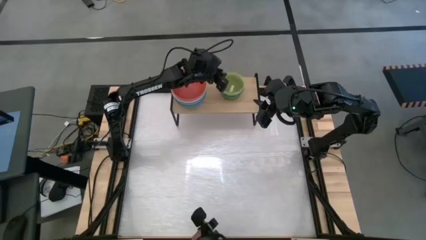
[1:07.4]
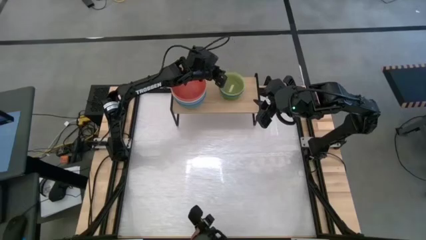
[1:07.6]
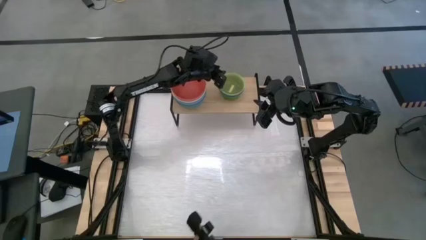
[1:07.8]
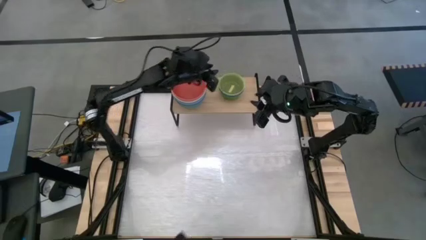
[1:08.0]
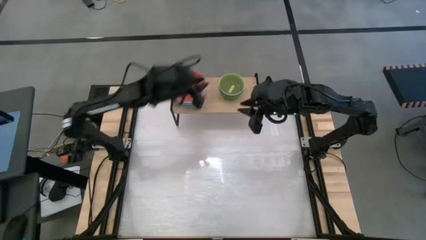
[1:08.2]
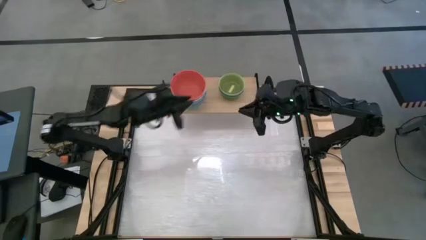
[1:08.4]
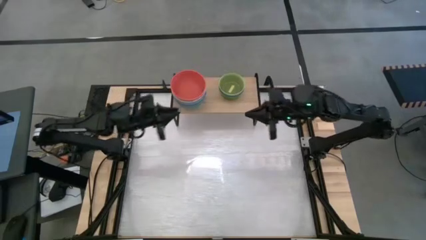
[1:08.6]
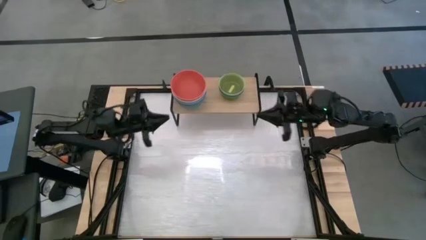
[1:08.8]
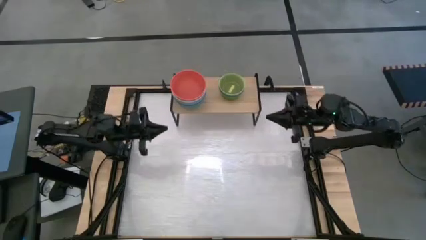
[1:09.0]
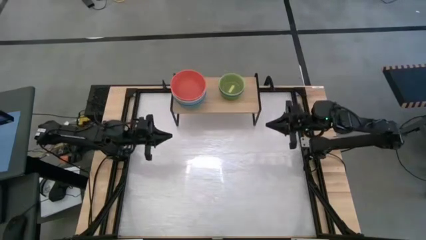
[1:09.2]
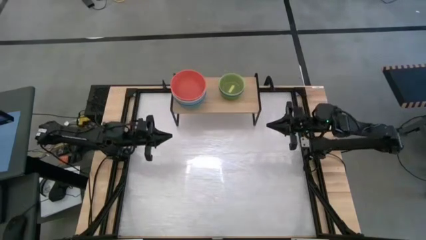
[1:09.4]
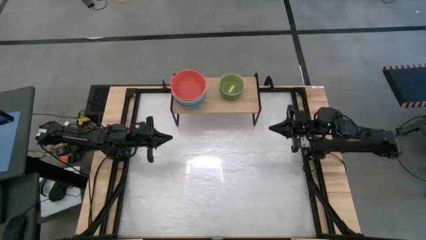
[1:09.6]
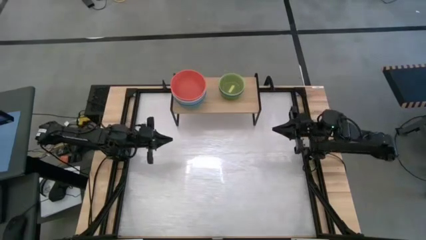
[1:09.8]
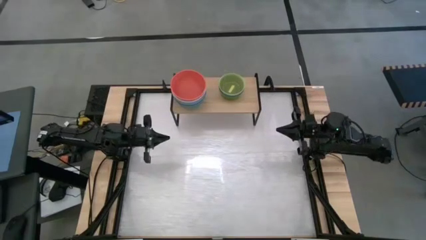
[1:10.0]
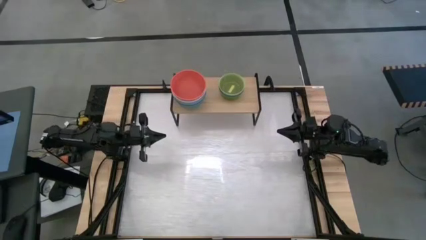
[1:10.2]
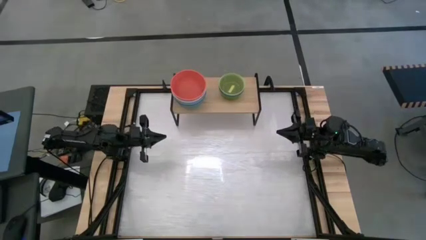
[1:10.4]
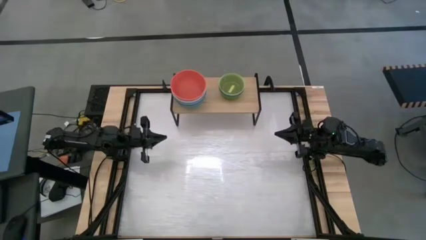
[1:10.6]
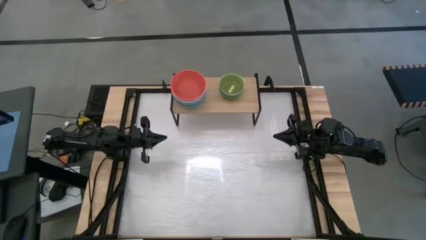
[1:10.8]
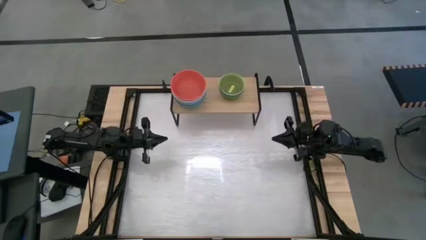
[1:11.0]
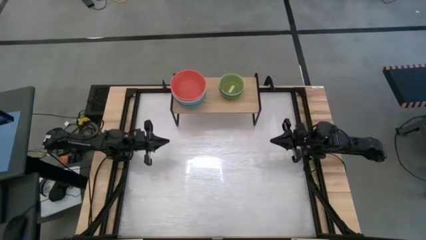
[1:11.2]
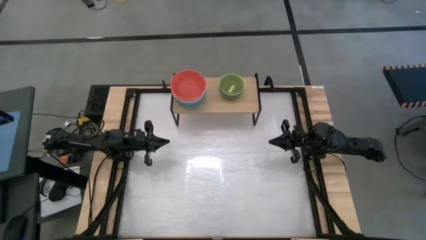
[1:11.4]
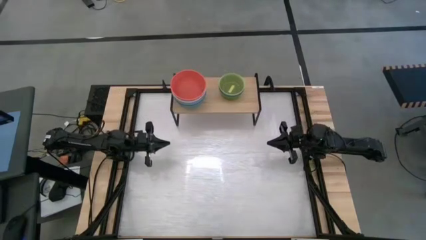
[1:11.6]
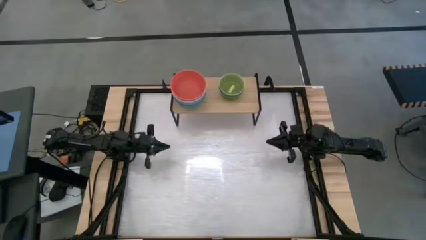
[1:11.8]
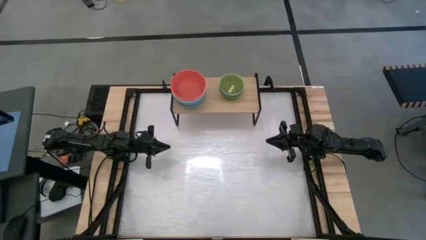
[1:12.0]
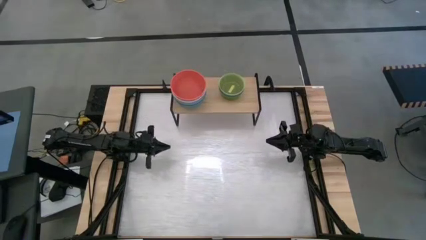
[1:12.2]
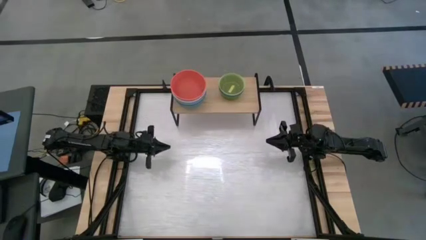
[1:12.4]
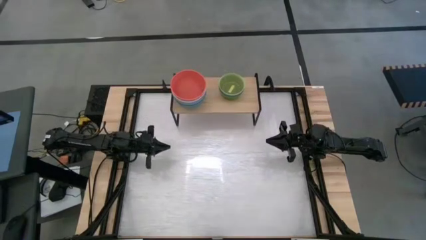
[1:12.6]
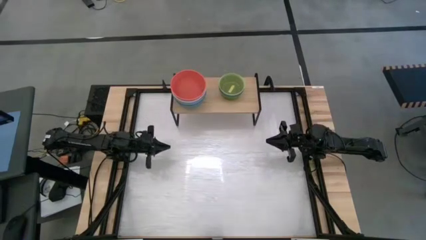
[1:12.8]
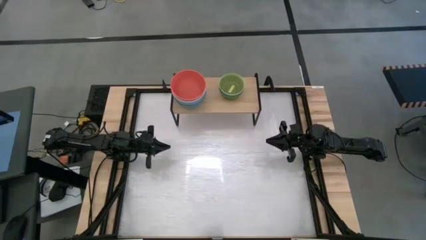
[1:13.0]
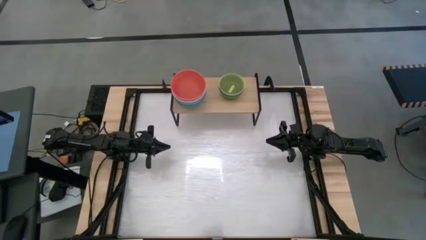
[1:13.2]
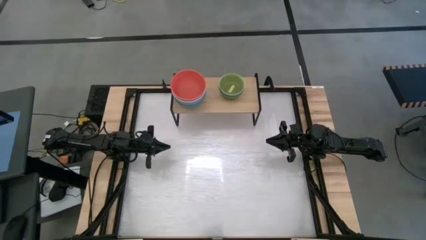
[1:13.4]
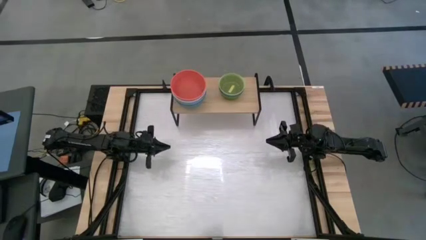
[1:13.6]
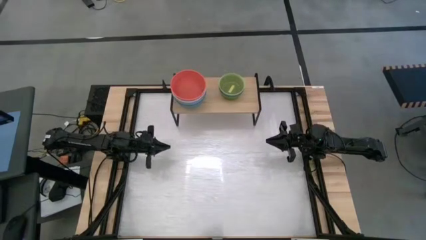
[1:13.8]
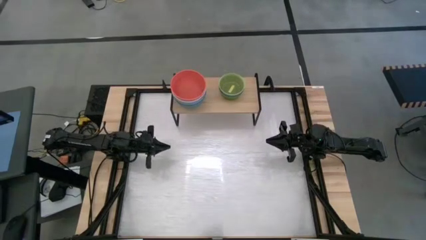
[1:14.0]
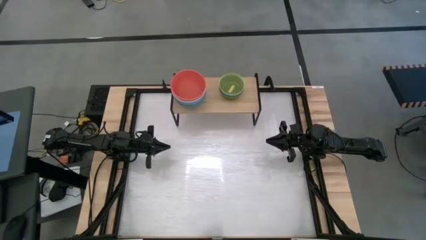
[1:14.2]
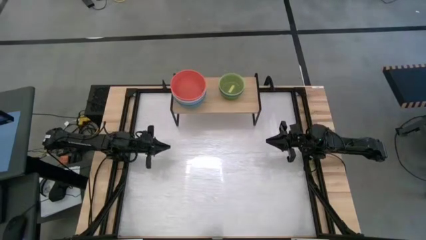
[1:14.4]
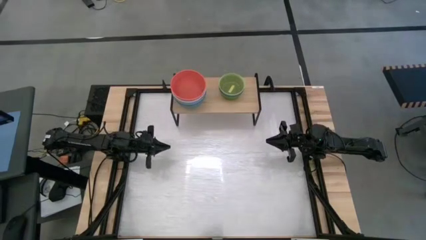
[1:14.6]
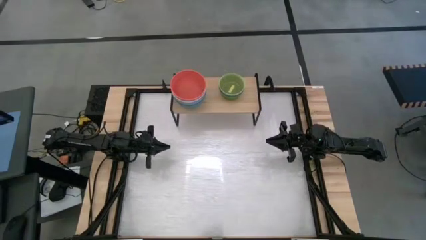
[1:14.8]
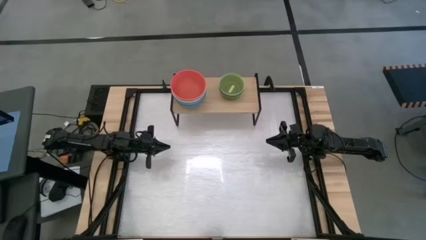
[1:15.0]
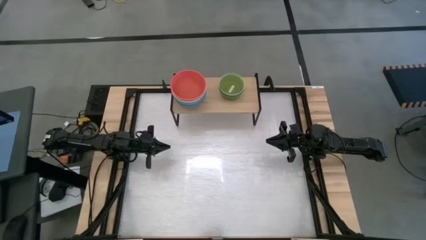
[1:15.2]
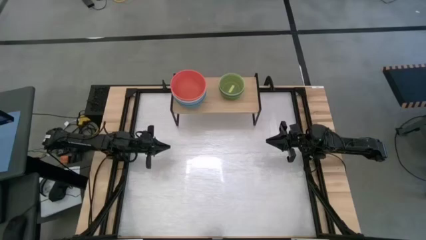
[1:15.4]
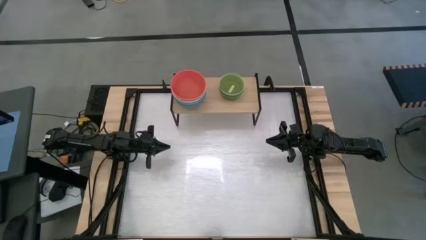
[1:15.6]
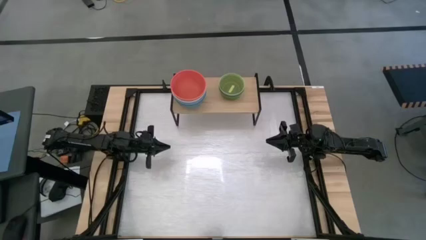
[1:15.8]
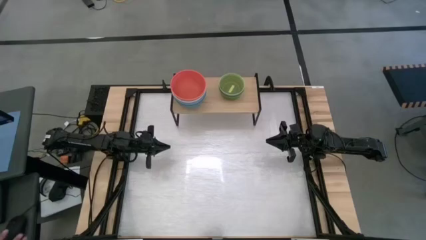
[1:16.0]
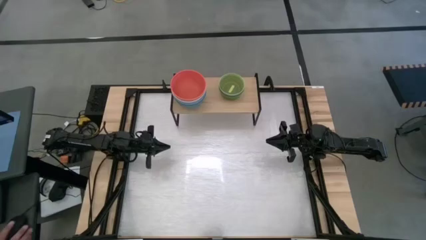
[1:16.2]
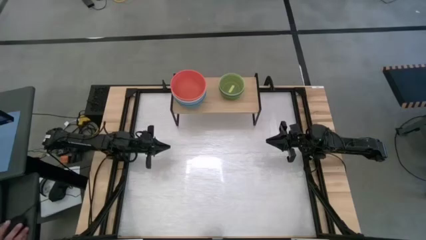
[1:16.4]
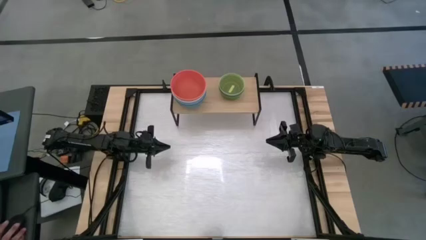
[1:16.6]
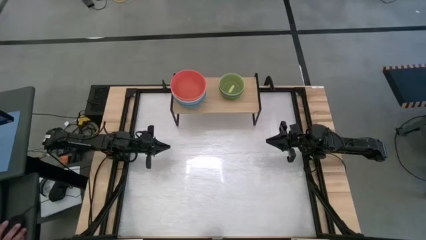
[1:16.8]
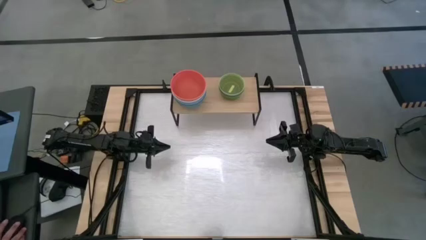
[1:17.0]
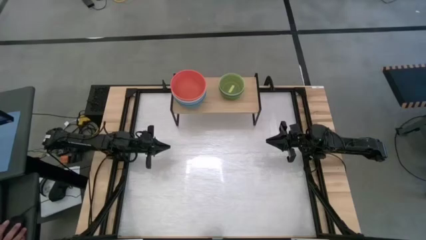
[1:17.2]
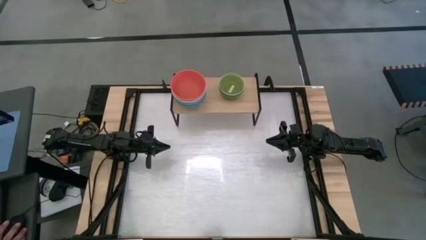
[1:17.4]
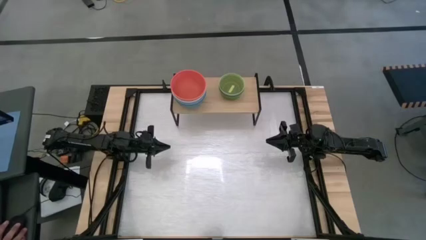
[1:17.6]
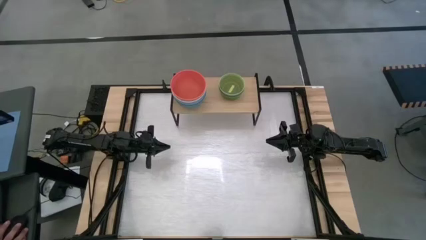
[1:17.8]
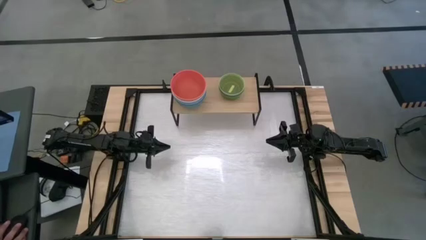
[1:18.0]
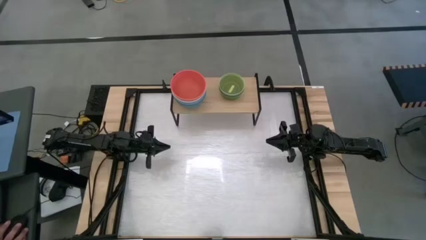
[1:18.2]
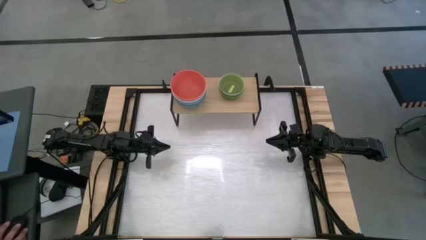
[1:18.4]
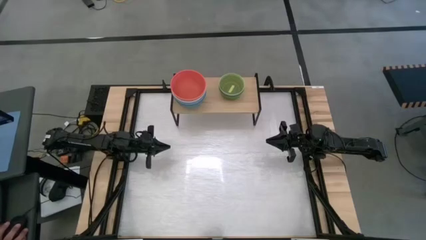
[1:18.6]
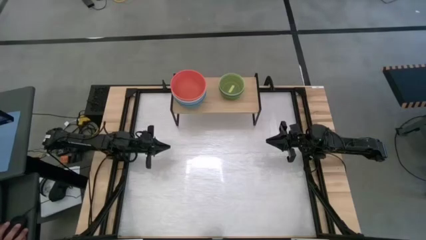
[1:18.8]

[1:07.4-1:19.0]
Task: Place and stack bowls onto a shelf
Return to Home Position

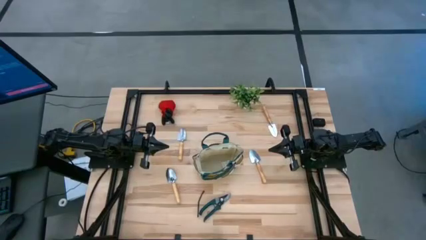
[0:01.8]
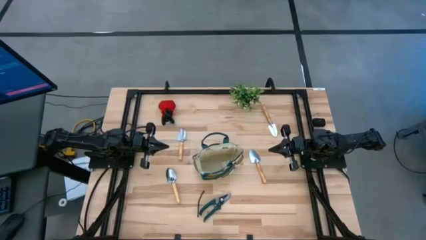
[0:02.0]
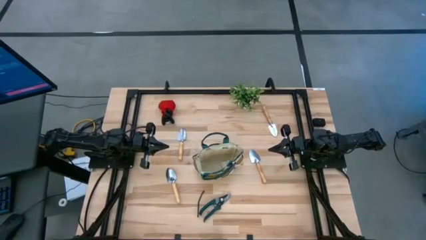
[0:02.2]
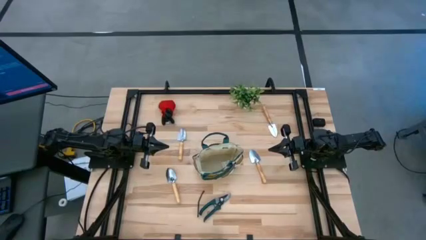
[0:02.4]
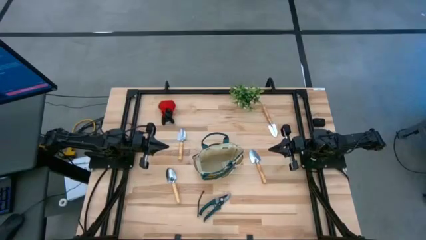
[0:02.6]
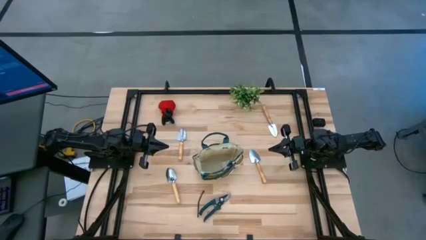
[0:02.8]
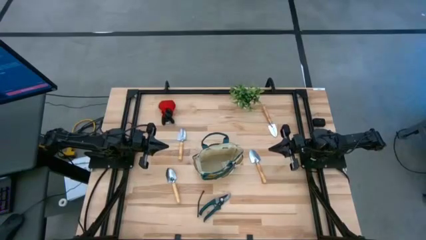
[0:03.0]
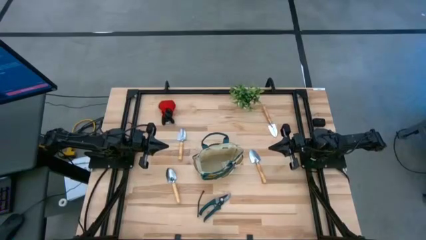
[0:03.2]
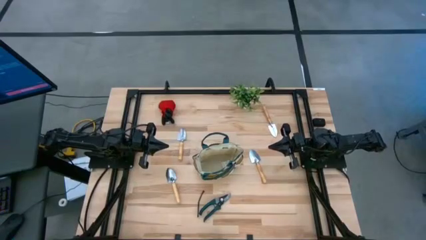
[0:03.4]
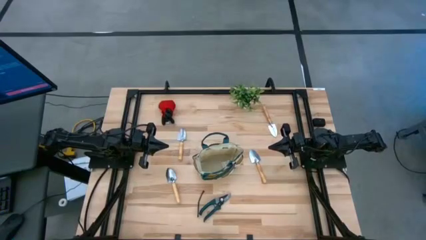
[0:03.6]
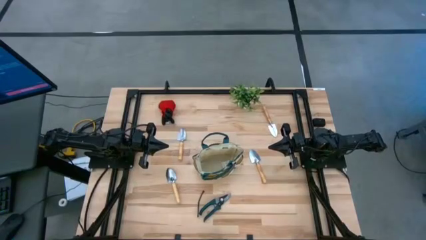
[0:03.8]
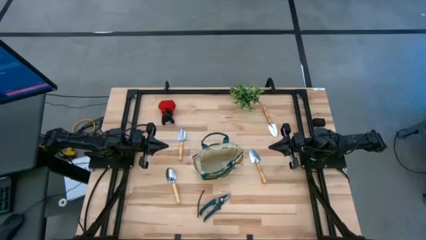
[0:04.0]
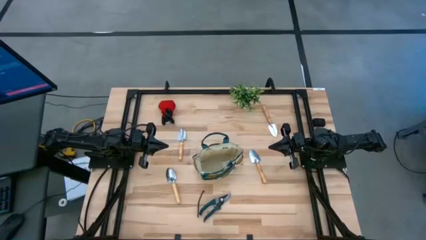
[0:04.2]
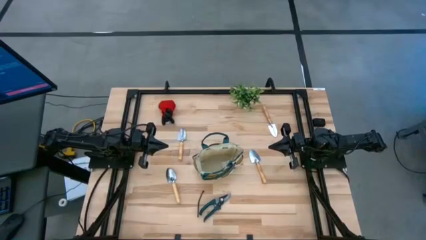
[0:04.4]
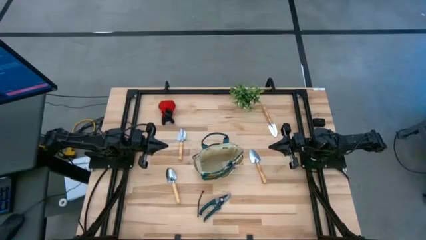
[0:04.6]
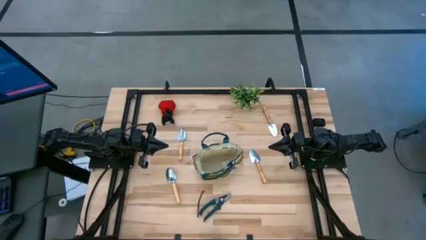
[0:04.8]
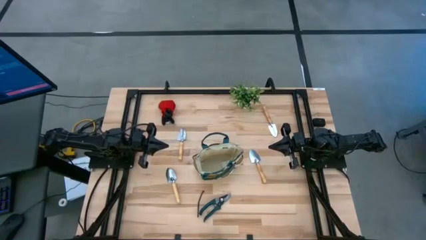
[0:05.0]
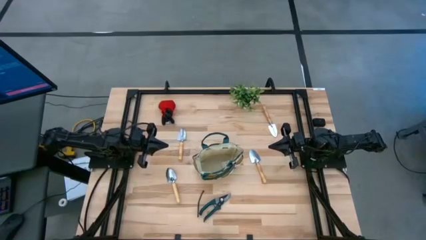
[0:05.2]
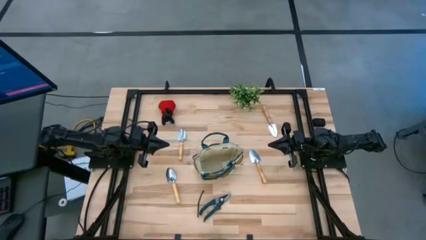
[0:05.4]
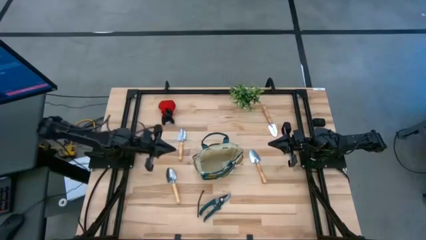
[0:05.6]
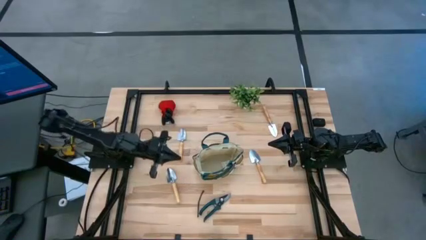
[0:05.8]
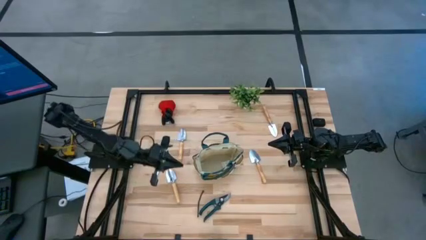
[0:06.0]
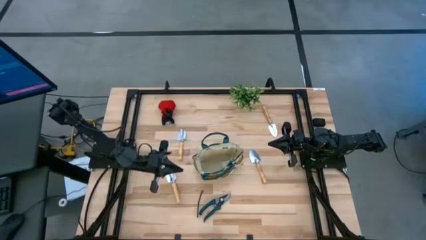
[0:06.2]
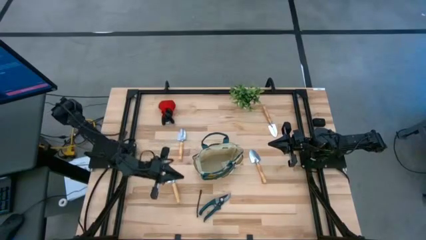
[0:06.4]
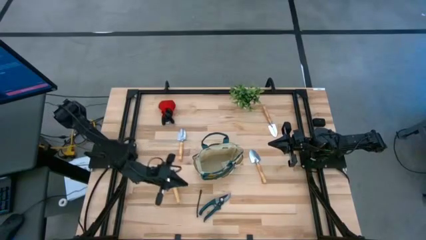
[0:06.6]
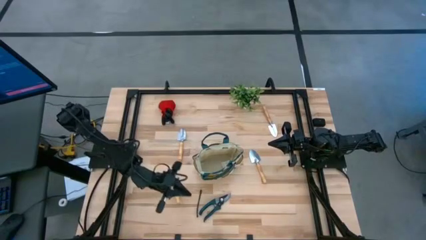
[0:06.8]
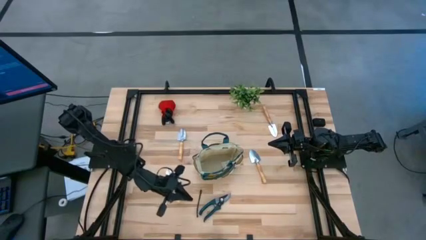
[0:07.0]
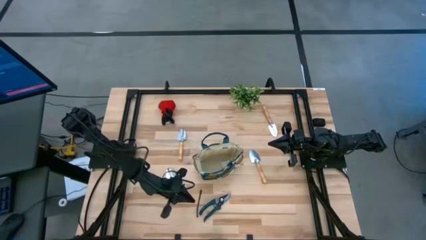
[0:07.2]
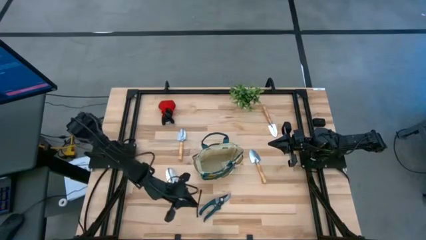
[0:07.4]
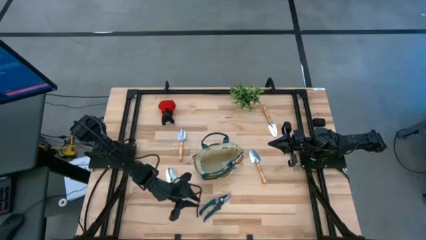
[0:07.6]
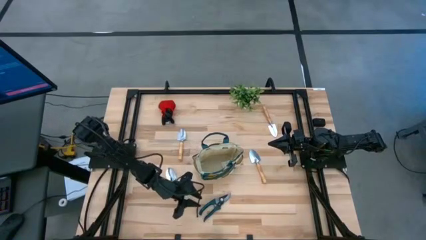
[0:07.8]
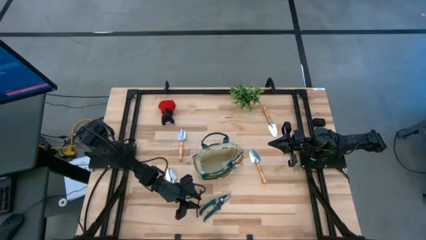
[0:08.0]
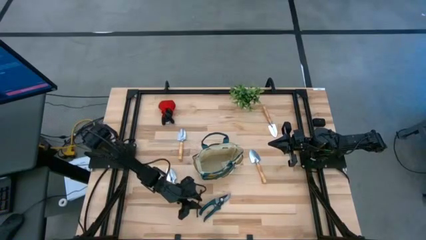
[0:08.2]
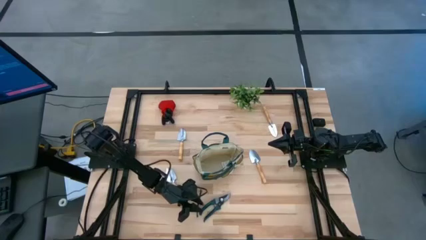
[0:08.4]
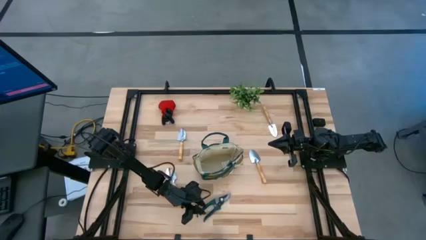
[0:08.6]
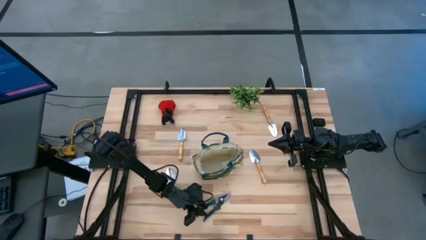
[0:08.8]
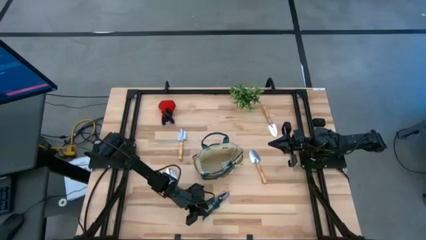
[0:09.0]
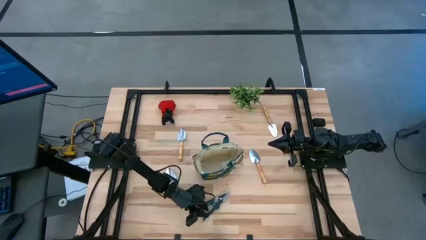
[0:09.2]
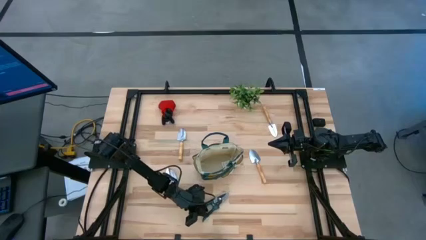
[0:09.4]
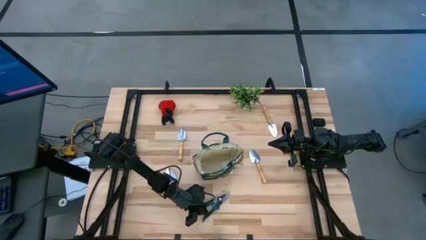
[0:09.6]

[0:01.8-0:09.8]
Task: Pick & Place Garden tools in Gardening bag
Put the green scissors into the gardening bag
